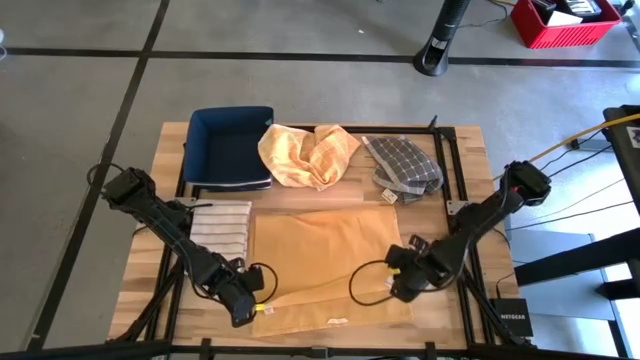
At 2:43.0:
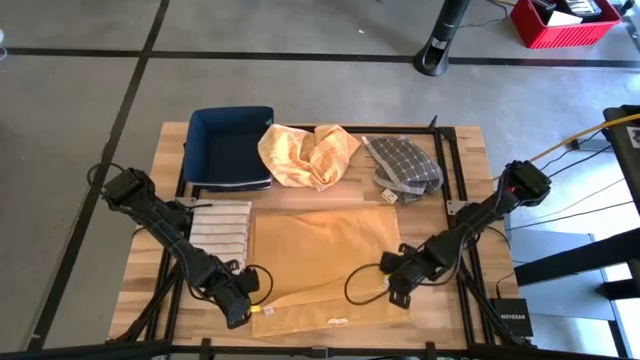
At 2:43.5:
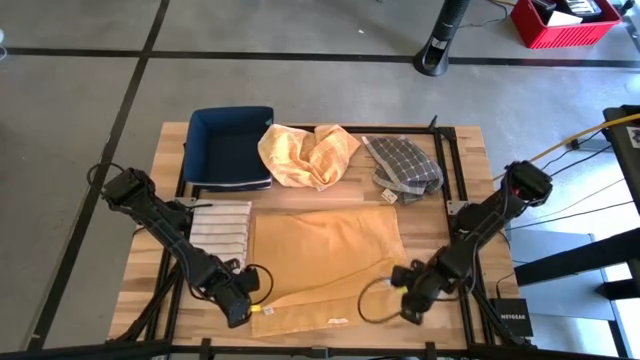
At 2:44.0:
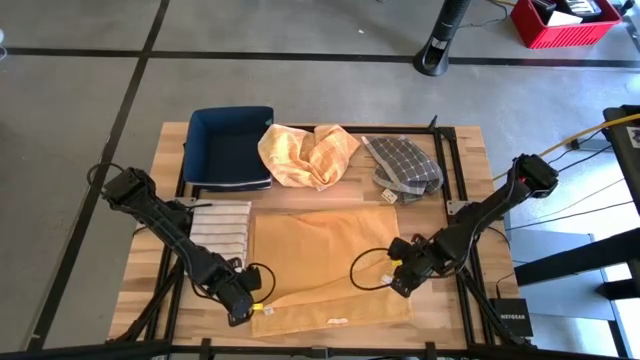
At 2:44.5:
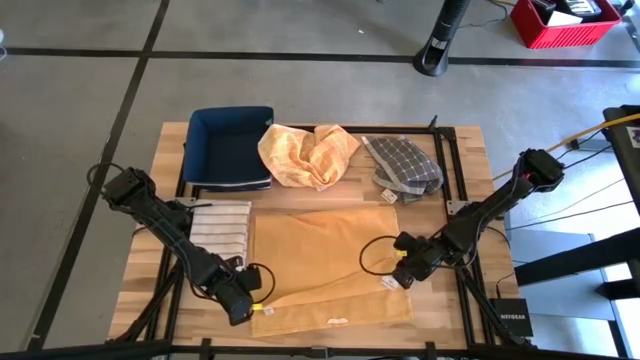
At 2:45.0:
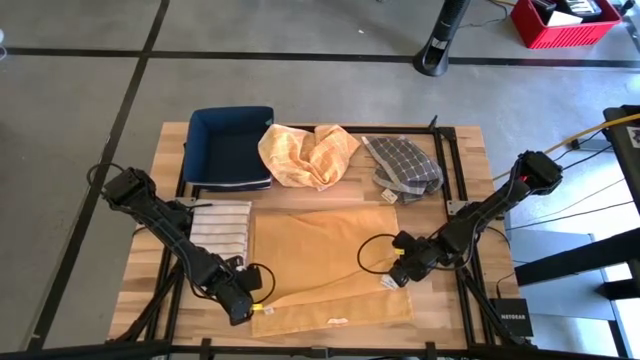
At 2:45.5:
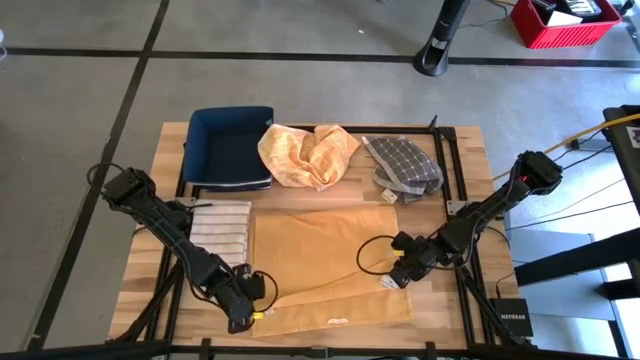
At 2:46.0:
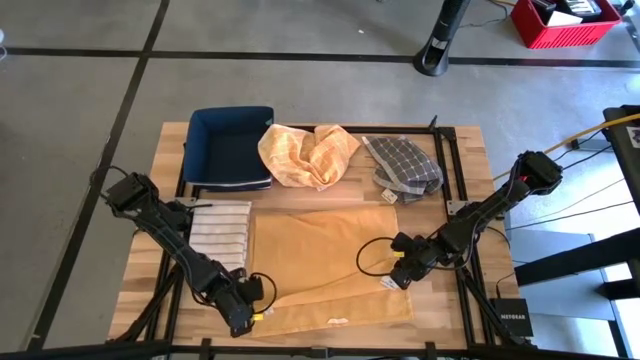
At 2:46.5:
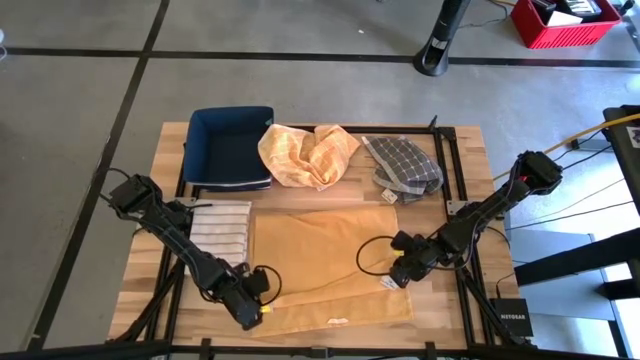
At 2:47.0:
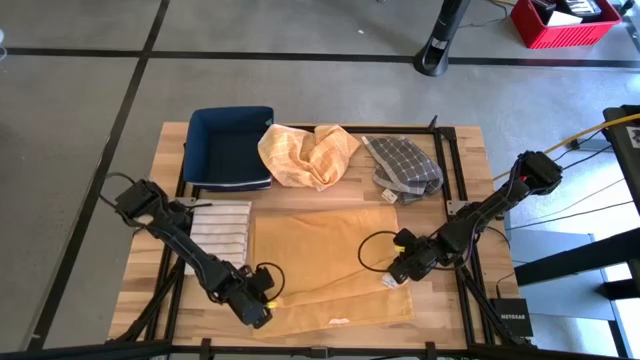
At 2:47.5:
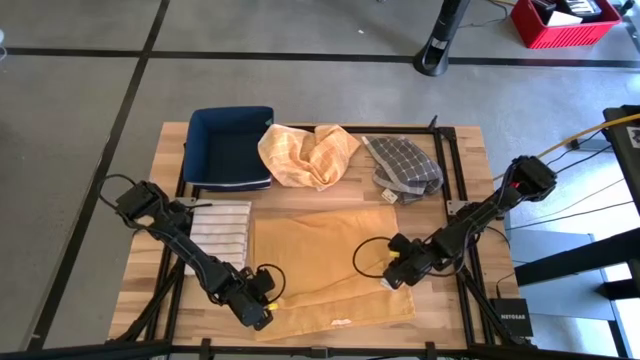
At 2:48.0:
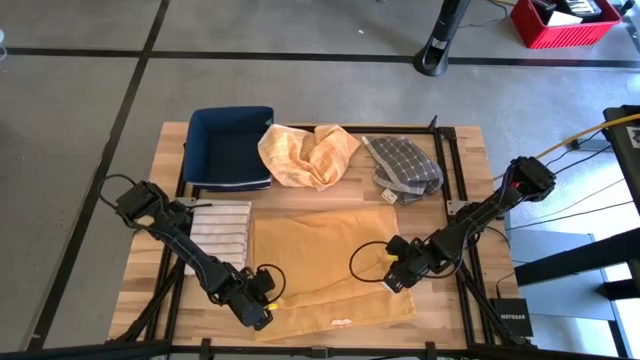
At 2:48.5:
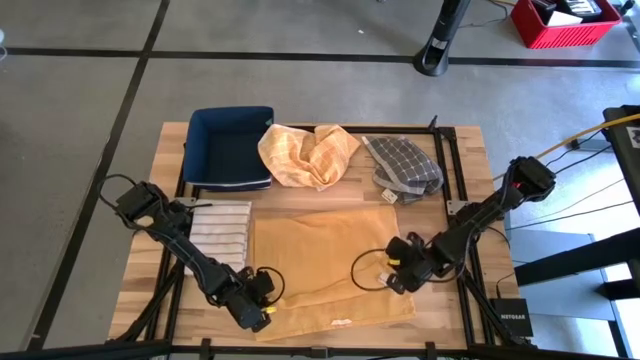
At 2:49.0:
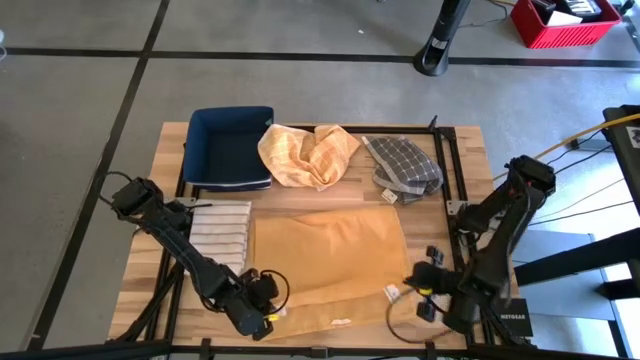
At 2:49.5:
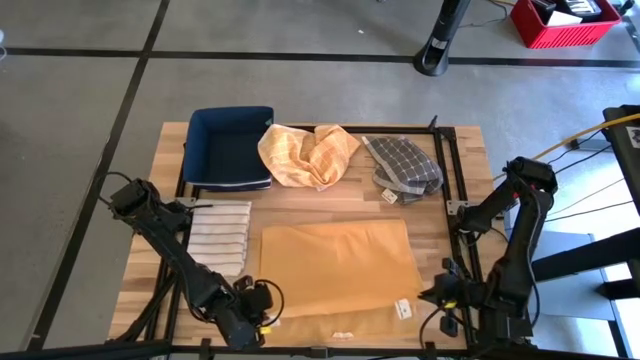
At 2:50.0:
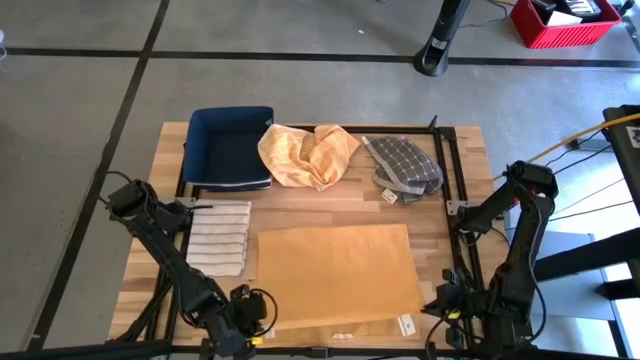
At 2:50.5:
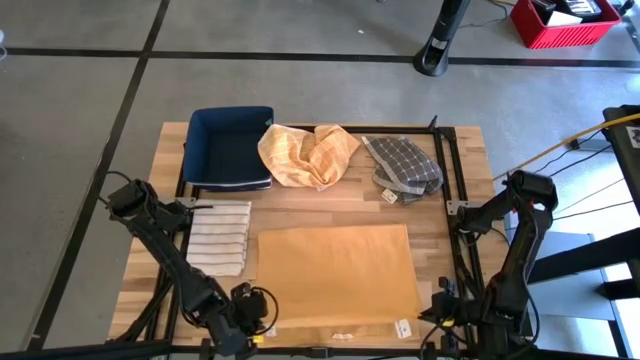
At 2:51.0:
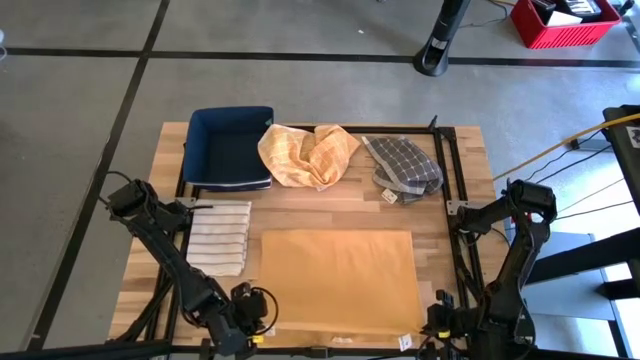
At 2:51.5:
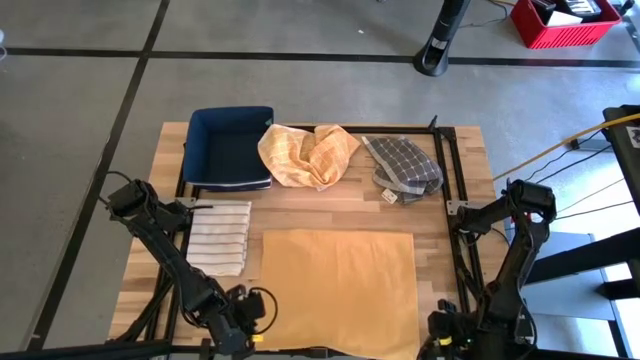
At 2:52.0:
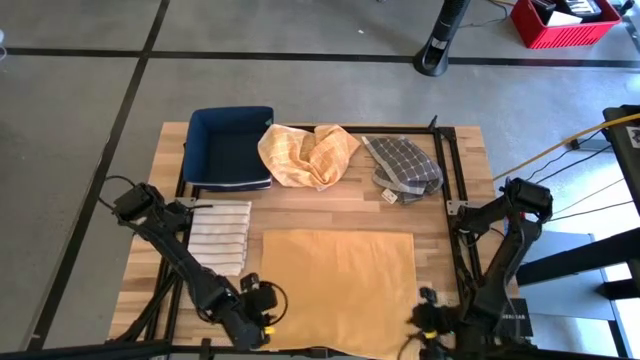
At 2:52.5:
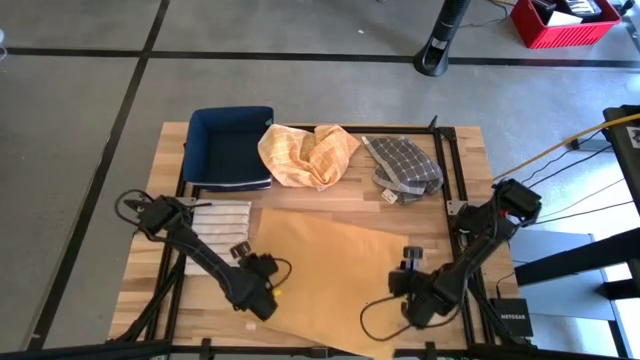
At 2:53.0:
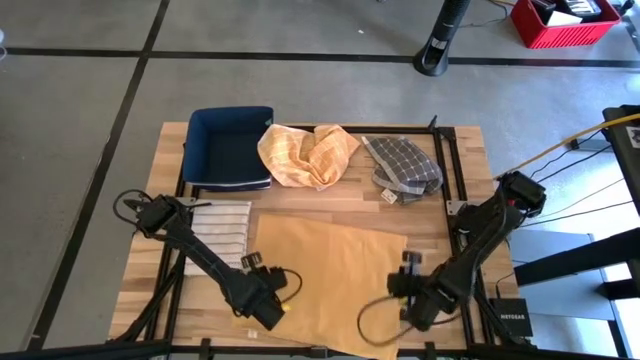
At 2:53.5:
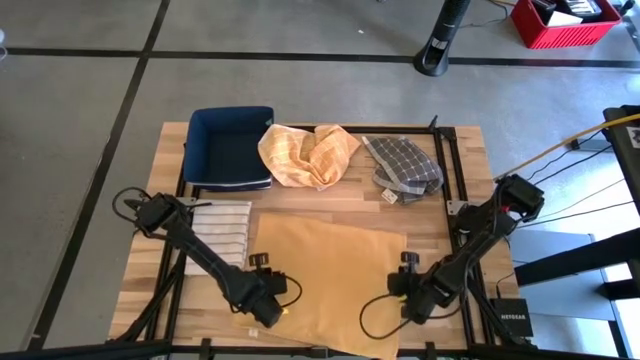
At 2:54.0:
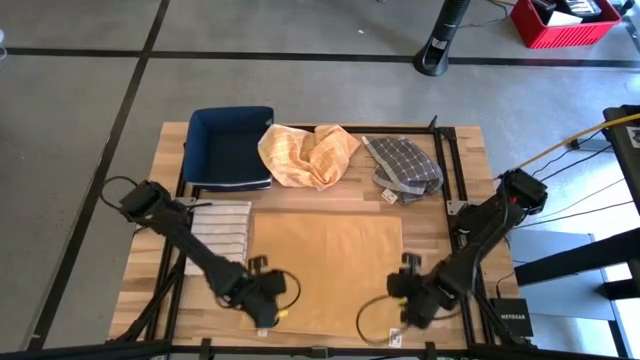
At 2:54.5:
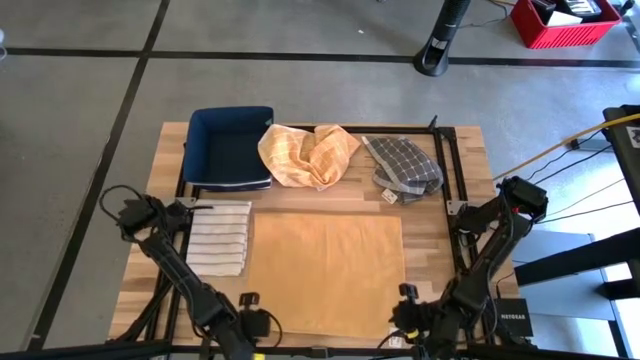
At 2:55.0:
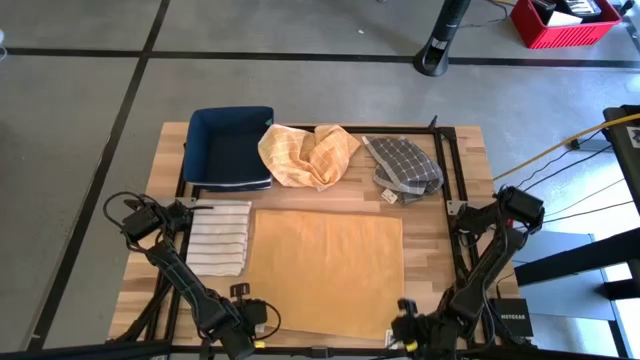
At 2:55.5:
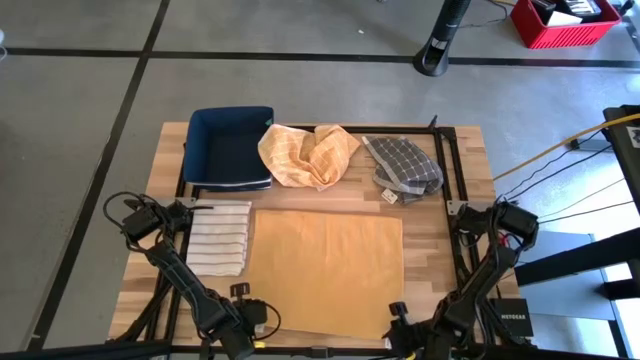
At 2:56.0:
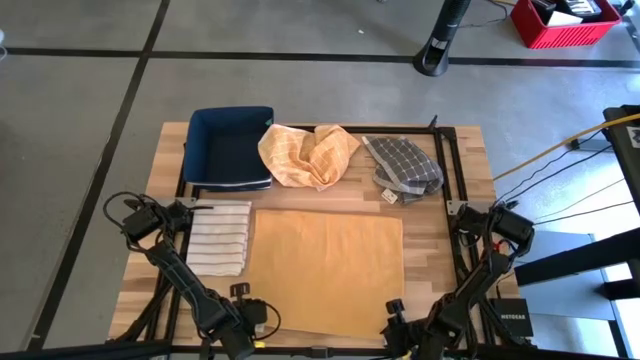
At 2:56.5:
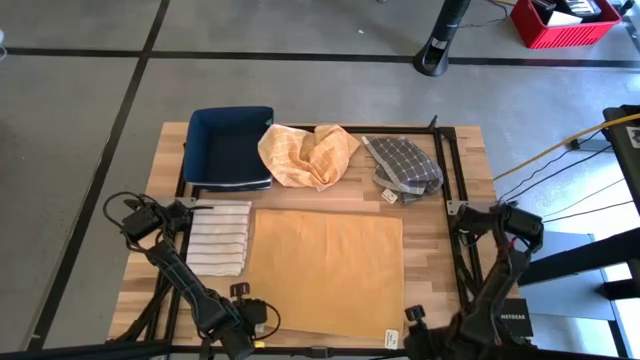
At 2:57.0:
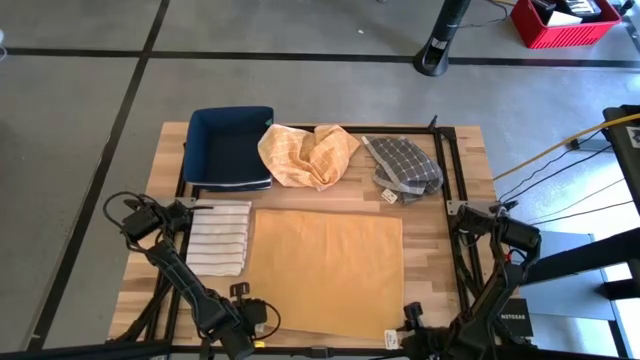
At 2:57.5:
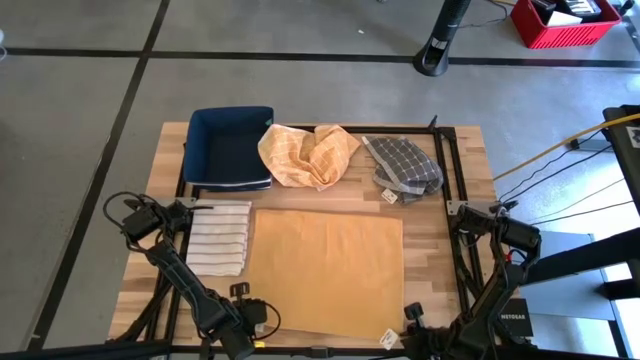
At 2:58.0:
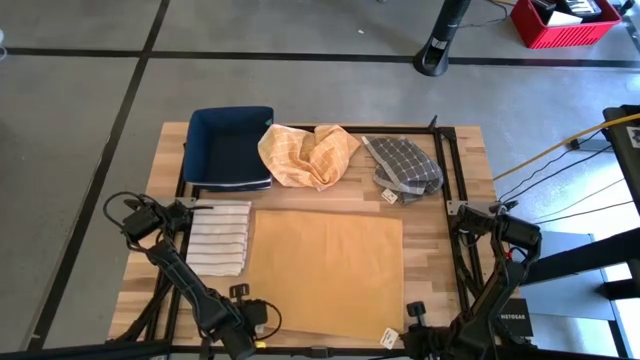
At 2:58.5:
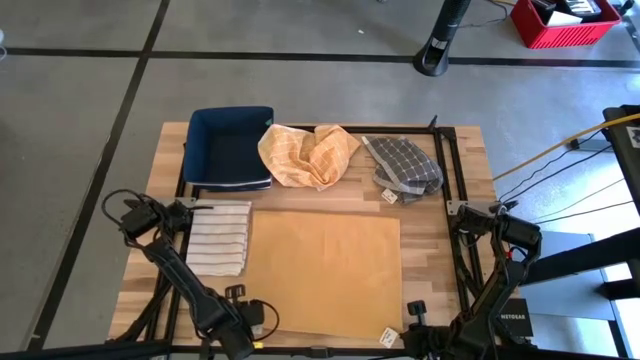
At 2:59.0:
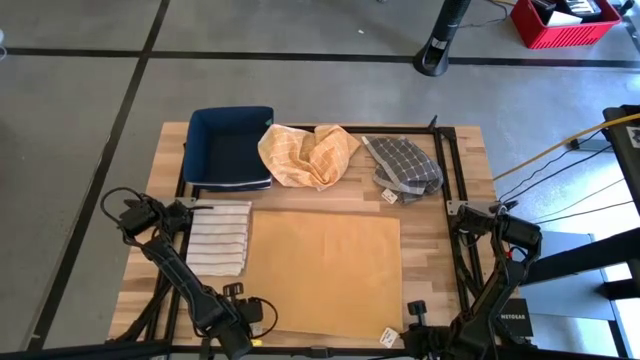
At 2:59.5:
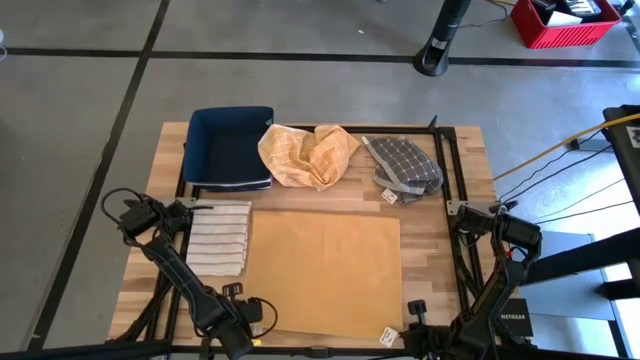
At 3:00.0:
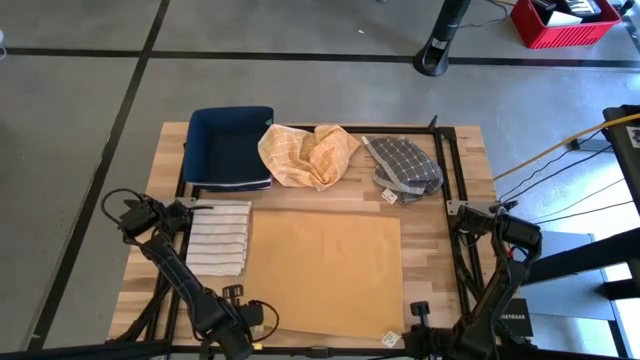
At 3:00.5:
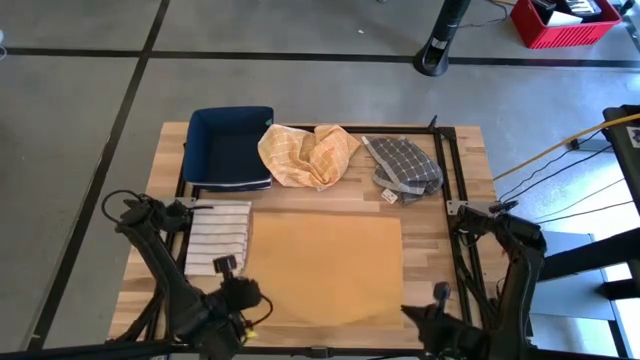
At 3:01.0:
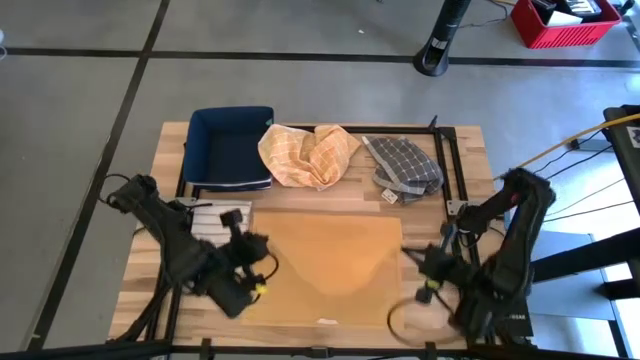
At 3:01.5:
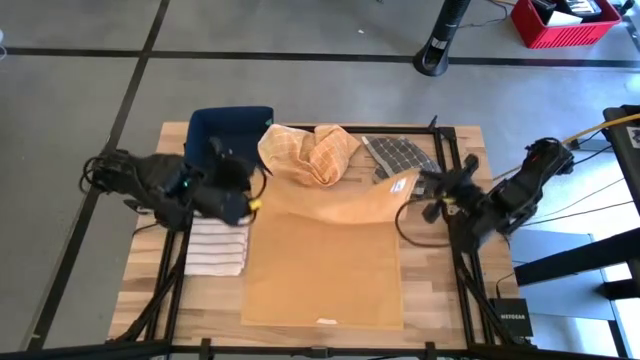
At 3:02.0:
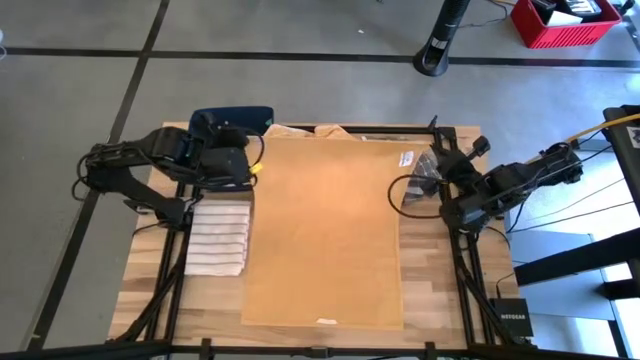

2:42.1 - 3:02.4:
Task: Fold towel
Fold the orange towel
